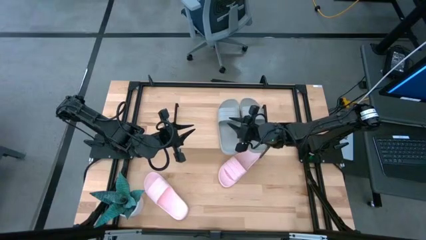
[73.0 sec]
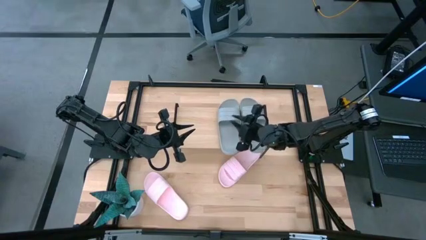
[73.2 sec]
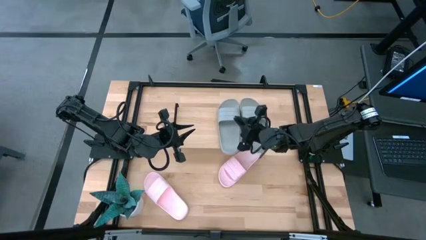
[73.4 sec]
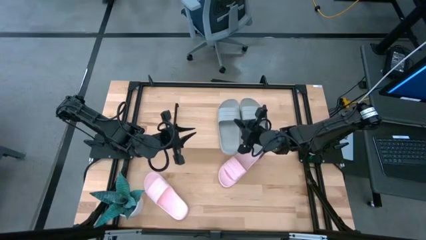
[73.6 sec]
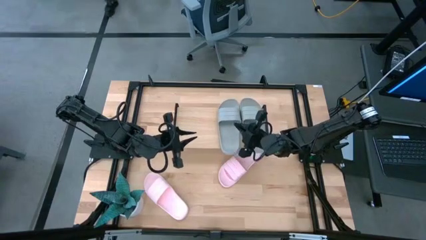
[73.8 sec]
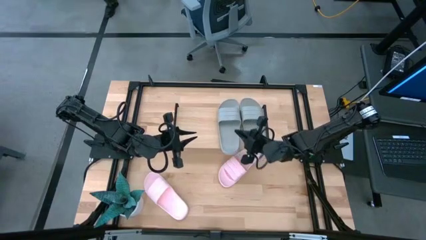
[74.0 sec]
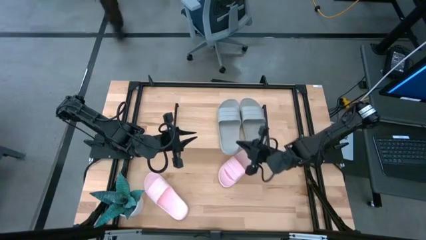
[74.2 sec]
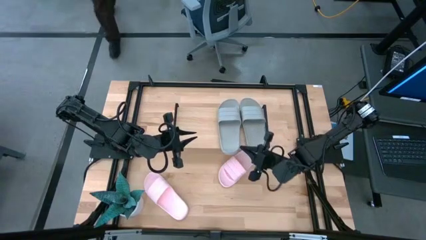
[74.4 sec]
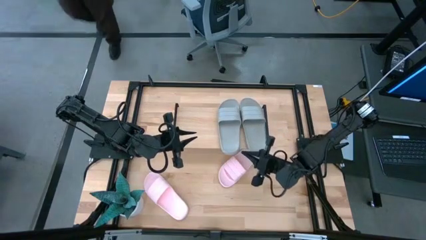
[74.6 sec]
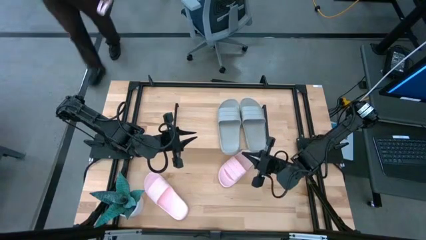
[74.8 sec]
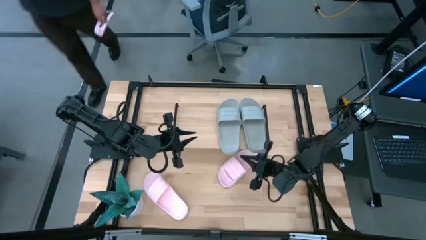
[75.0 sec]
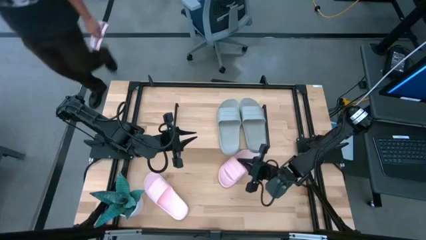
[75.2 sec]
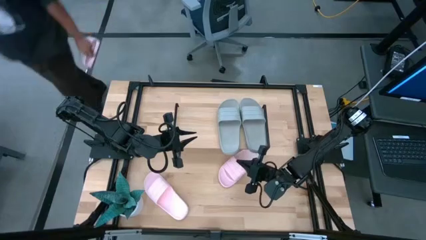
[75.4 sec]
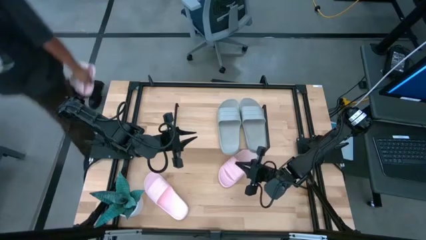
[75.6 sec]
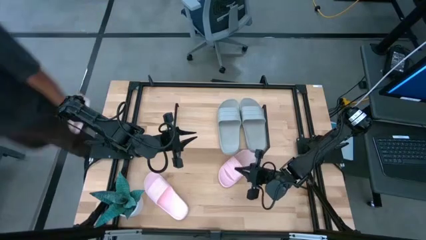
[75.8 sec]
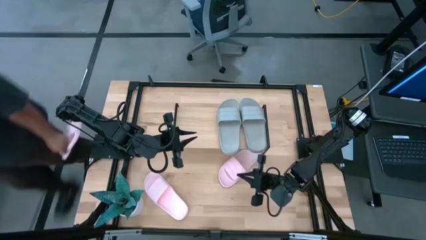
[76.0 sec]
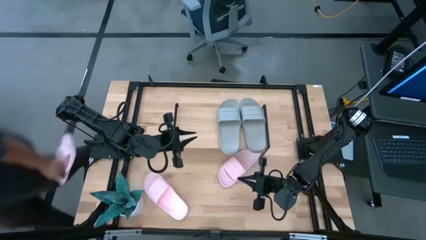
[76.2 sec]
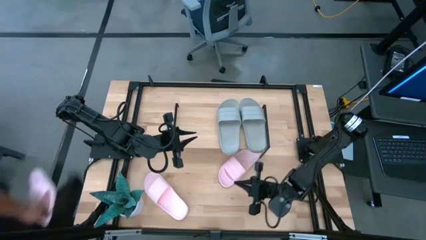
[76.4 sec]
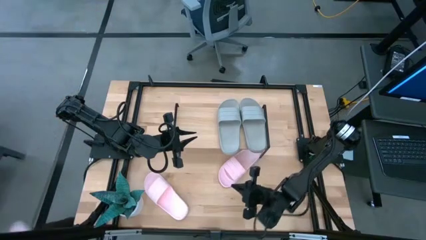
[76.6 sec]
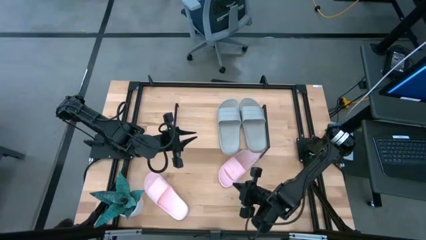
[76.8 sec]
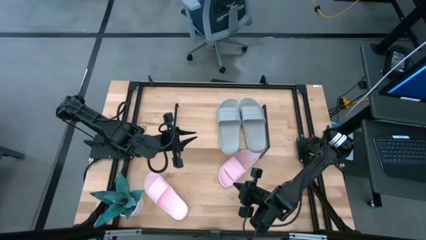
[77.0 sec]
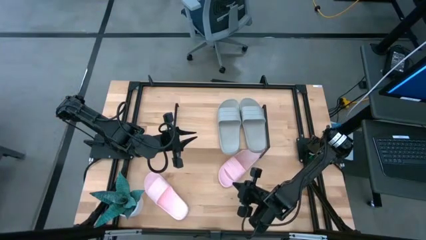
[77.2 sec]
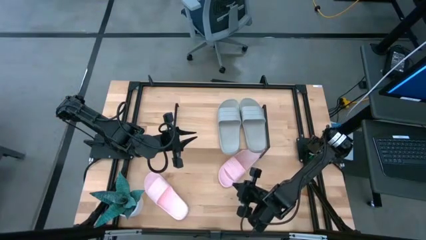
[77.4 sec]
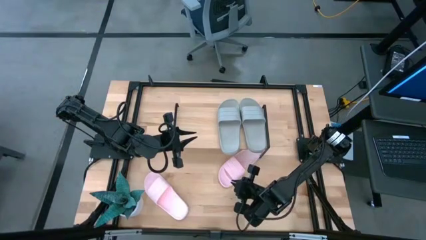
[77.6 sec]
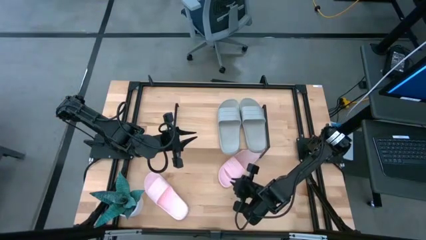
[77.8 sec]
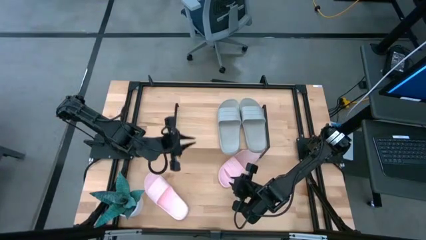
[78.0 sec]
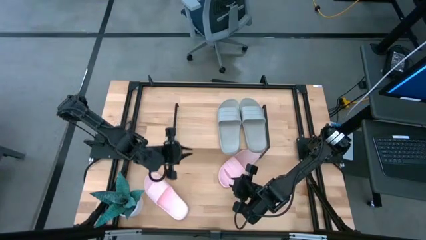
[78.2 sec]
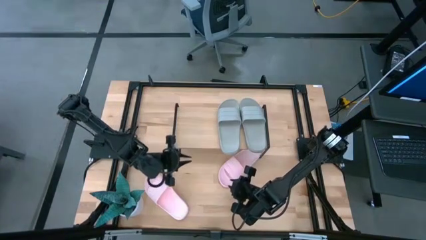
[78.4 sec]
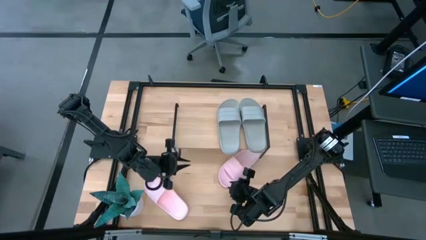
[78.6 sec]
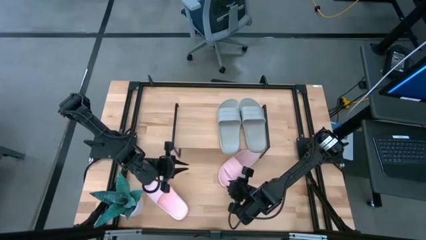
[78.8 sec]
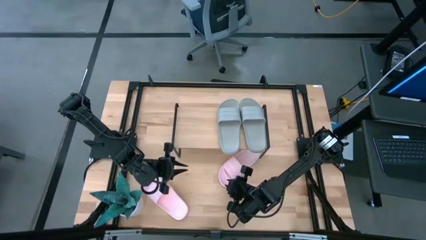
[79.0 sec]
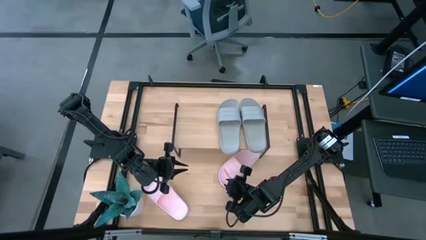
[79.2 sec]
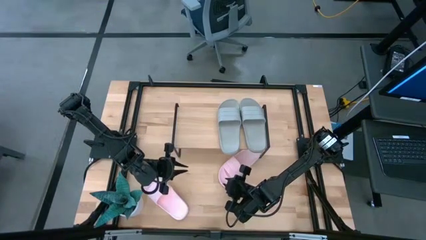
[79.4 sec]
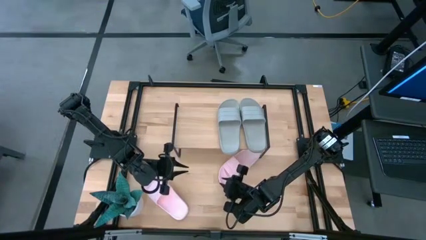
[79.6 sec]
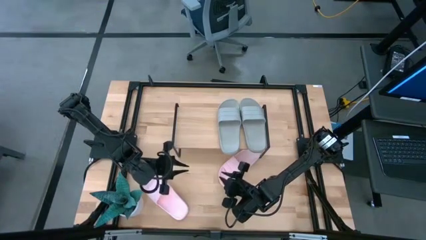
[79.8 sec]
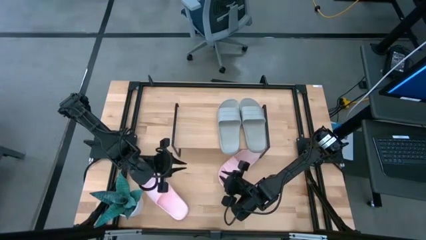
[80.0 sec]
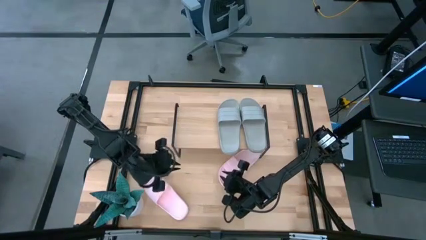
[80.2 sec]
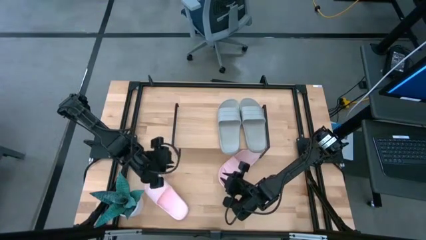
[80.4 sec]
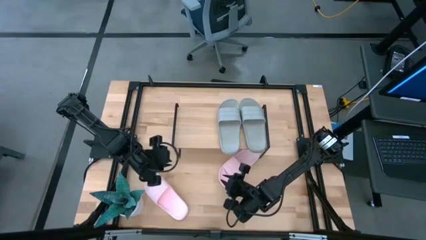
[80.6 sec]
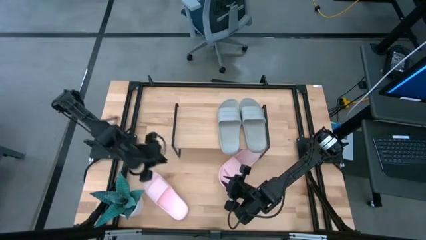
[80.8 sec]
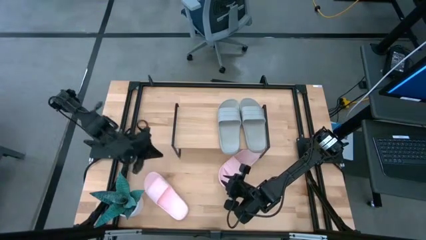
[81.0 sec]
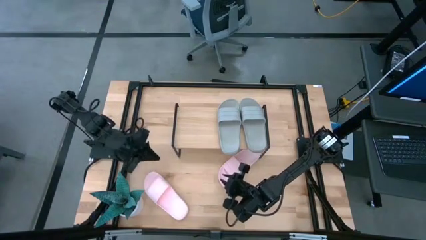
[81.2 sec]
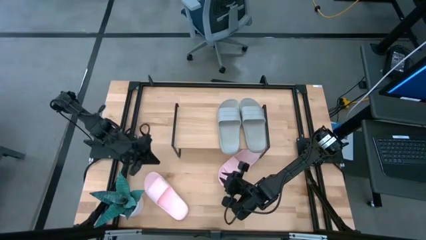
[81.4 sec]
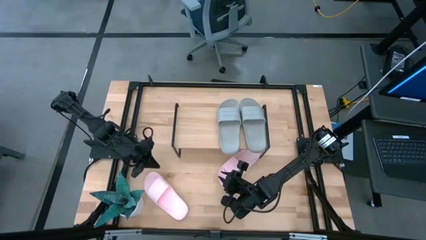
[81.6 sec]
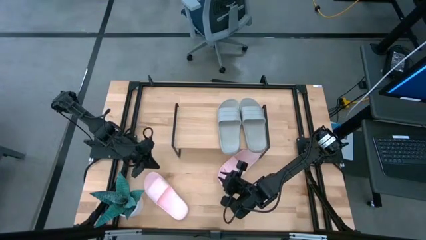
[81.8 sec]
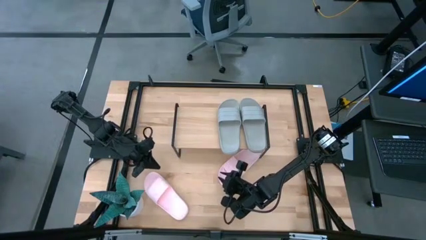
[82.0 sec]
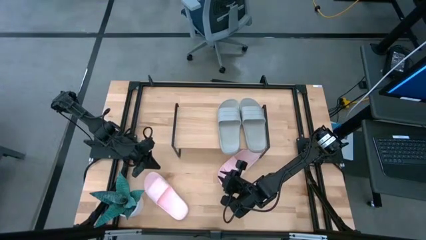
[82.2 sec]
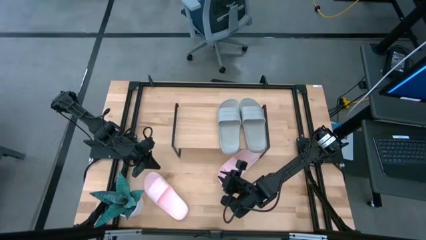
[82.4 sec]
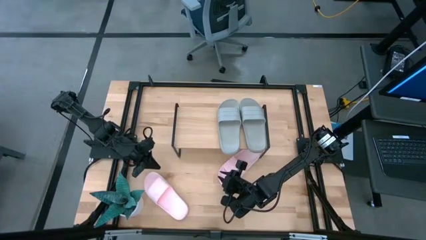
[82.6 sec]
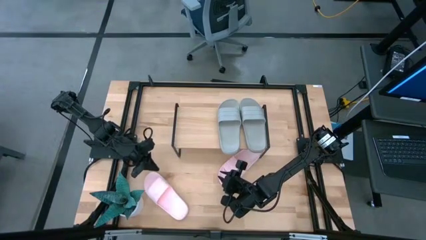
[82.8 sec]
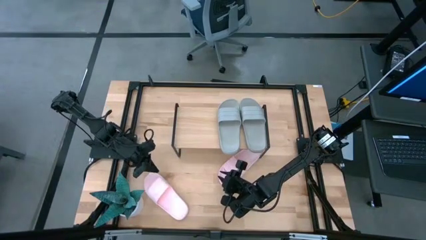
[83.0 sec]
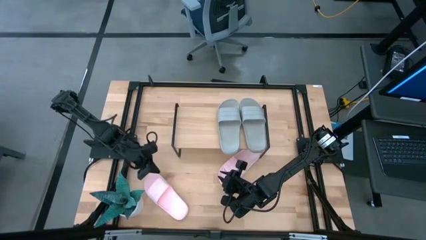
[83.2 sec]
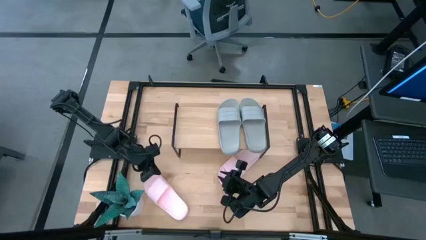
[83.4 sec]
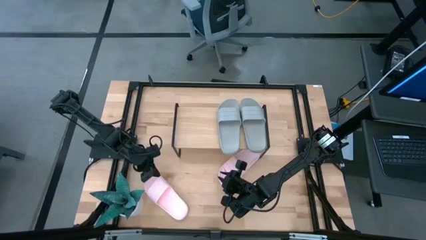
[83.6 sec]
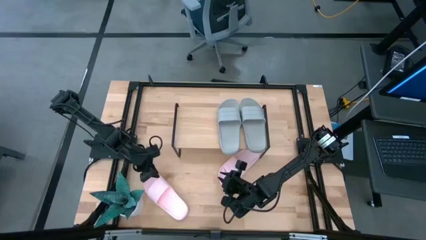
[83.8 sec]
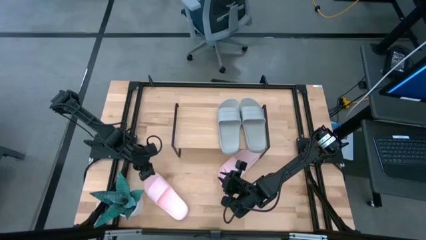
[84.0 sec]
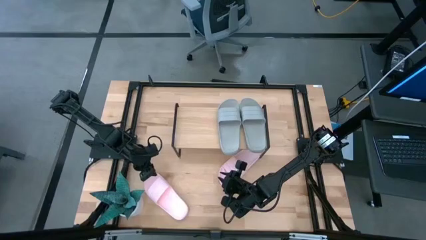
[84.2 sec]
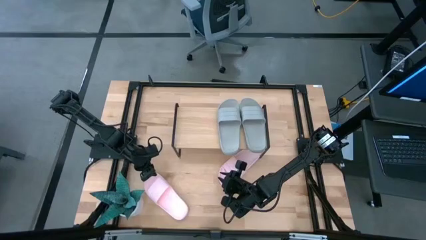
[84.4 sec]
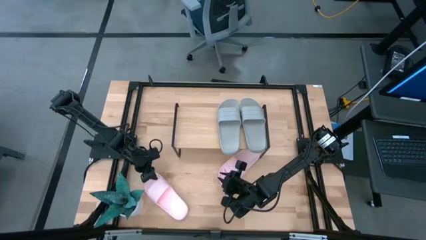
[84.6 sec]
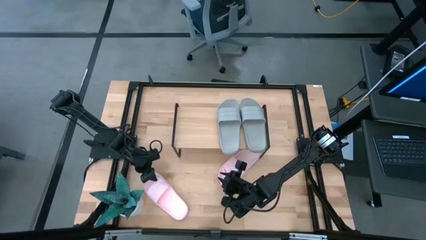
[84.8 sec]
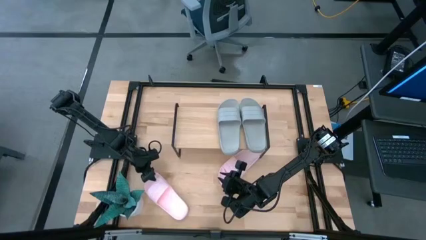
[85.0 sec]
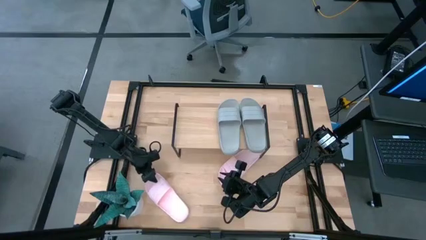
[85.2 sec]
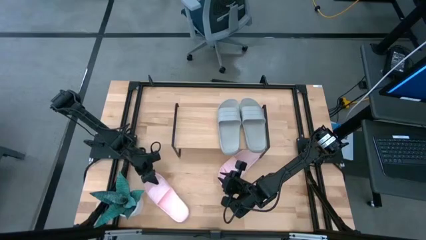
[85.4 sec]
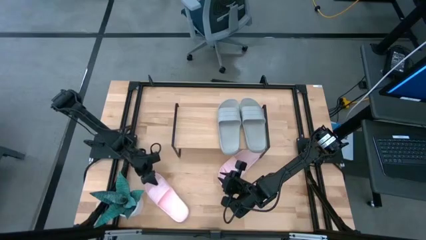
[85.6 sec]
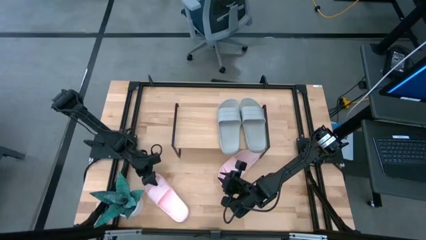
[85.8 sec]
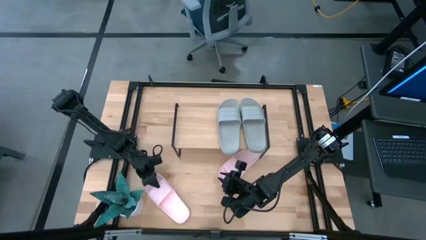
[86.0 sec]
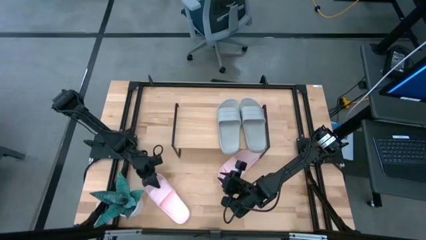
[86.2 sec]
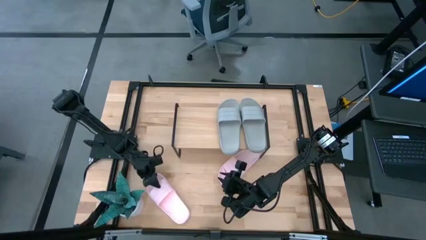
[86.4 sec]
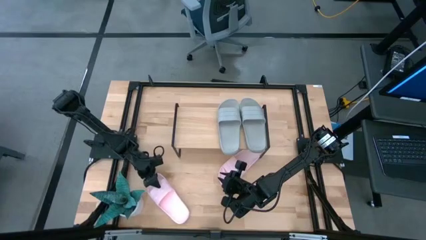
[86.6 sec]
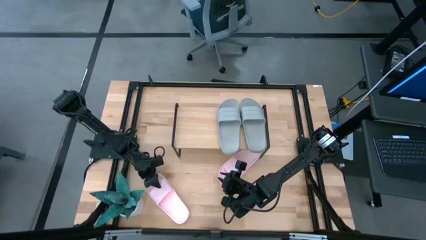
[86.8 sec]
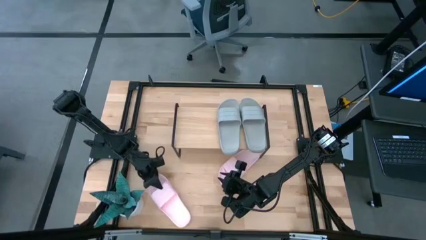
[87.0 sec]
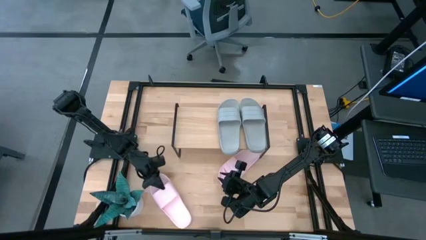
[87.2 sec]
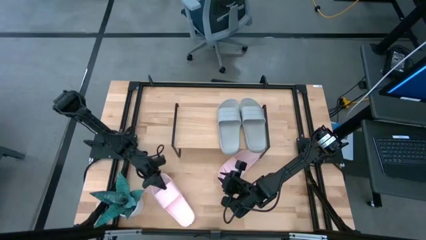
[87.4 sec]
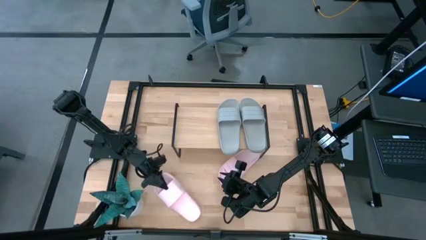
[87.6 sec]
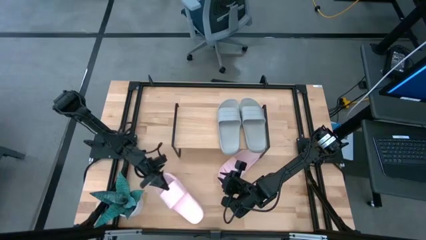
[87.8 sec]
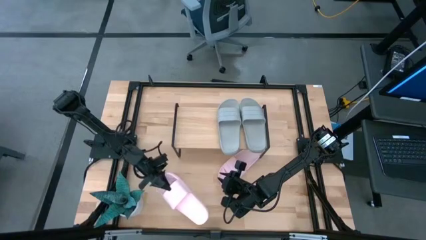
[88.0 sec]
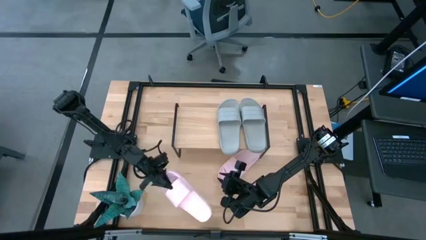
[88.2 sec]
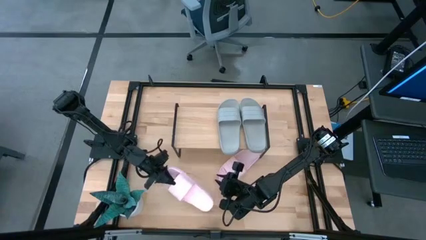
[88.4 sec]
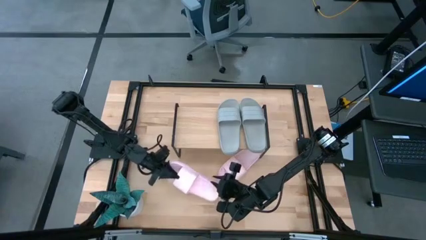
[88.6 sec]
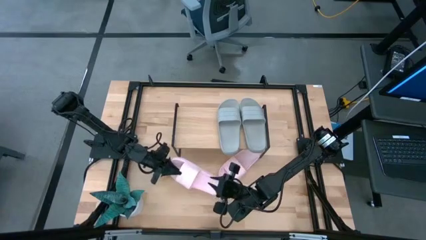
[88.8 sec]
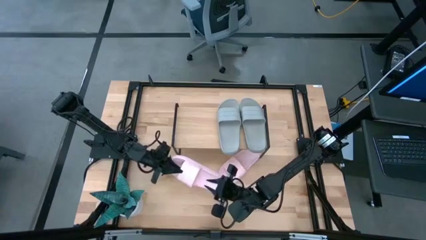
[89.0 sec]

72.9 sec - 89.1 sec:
Task: Pick and place slides into the shelf
Put the left pink slide on the shelf
